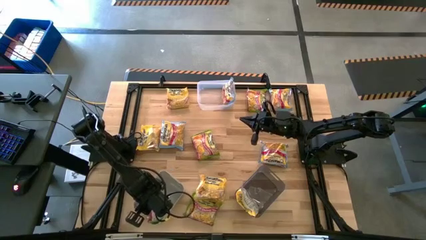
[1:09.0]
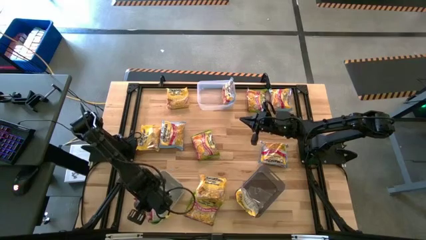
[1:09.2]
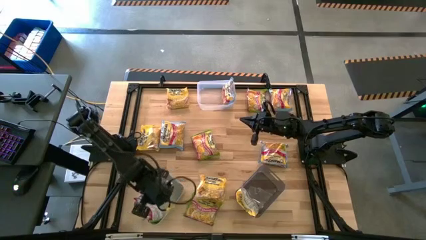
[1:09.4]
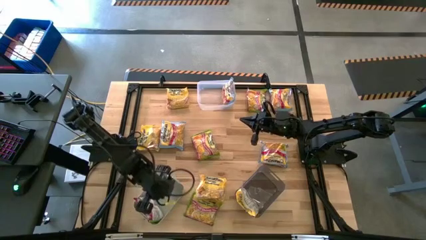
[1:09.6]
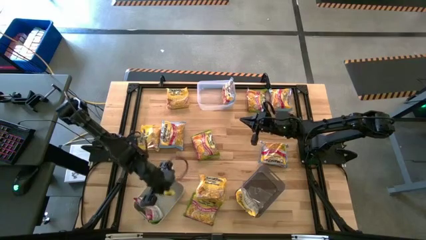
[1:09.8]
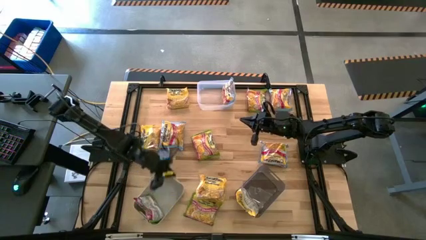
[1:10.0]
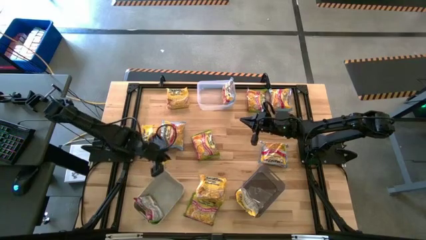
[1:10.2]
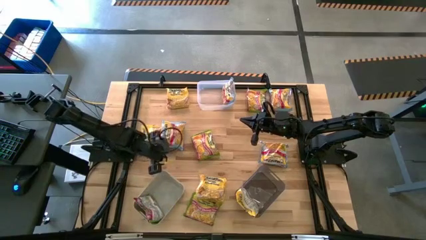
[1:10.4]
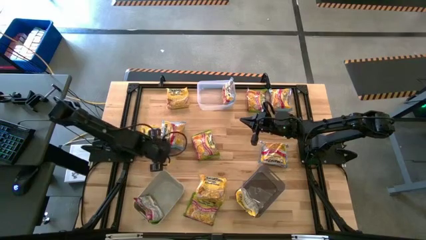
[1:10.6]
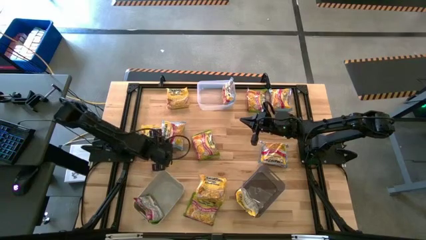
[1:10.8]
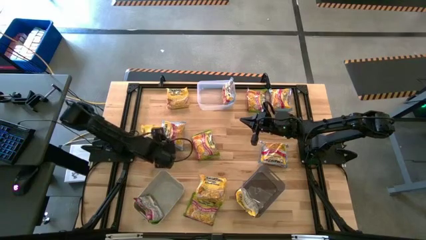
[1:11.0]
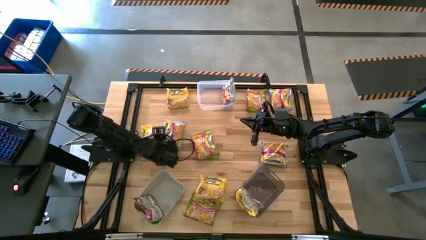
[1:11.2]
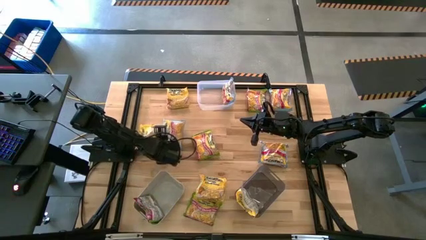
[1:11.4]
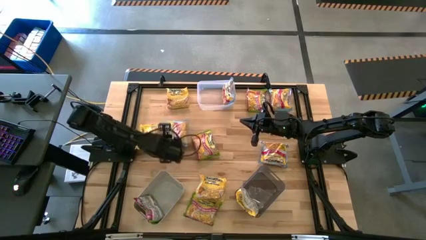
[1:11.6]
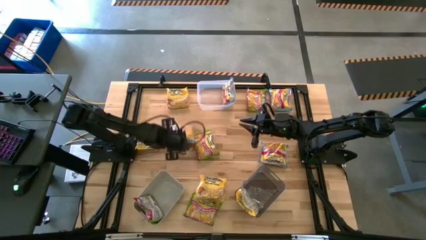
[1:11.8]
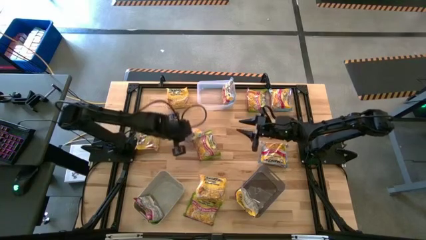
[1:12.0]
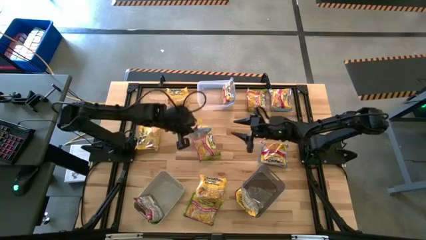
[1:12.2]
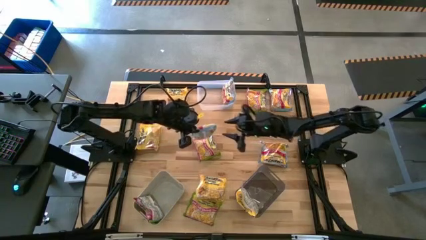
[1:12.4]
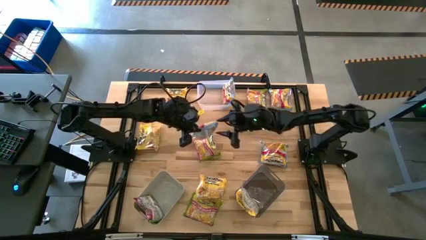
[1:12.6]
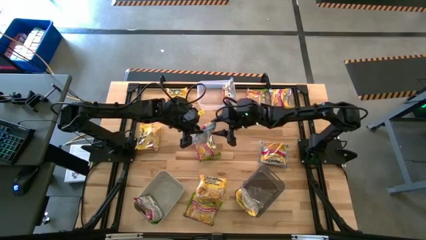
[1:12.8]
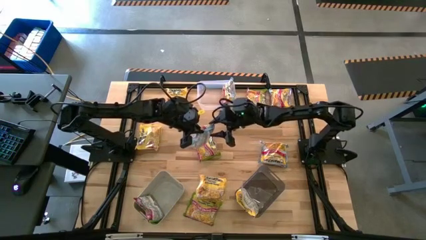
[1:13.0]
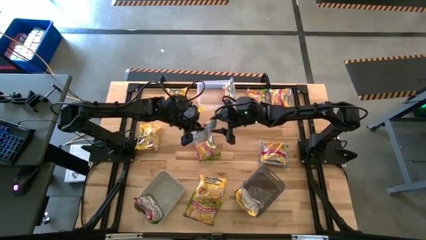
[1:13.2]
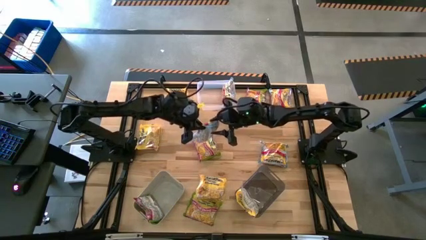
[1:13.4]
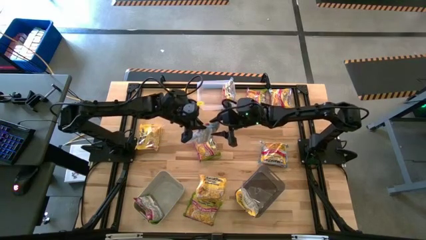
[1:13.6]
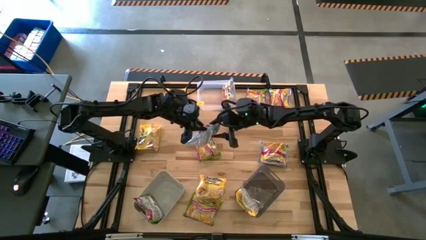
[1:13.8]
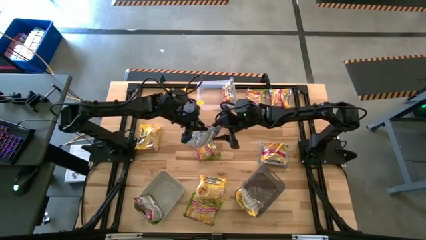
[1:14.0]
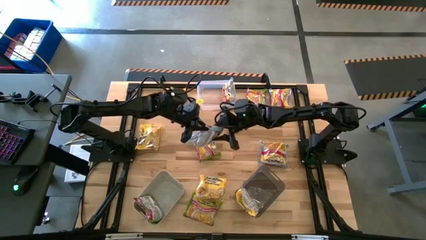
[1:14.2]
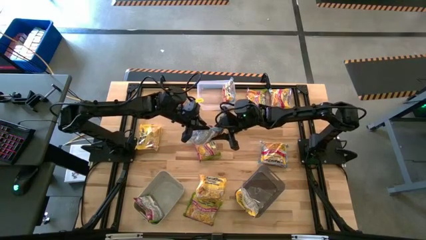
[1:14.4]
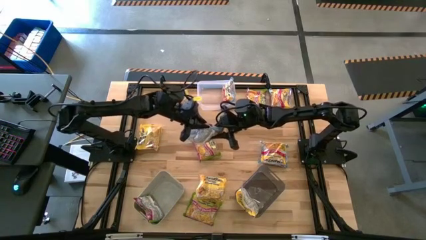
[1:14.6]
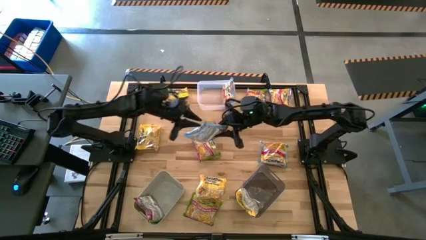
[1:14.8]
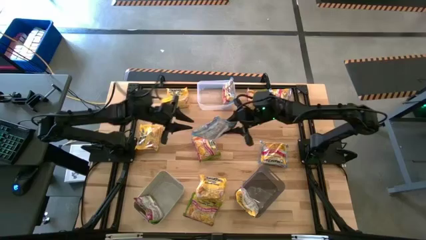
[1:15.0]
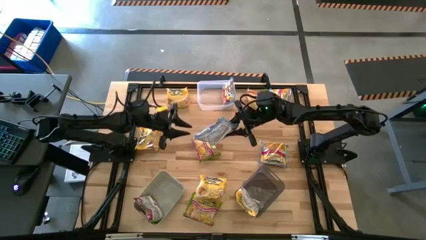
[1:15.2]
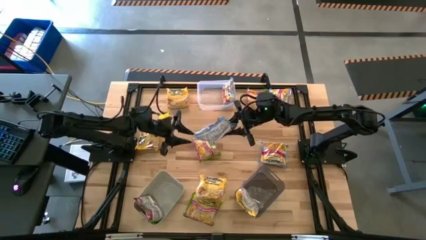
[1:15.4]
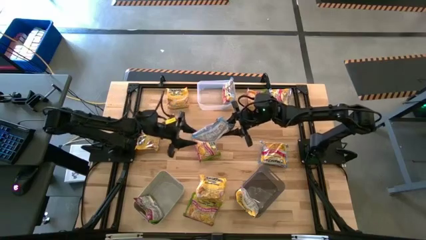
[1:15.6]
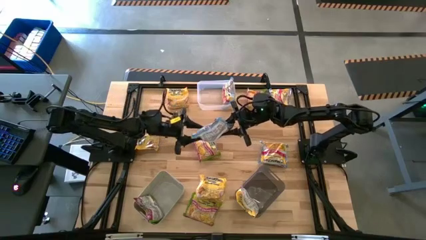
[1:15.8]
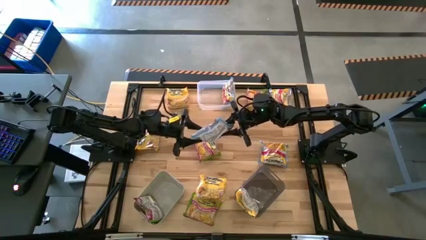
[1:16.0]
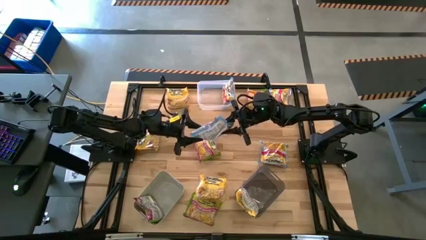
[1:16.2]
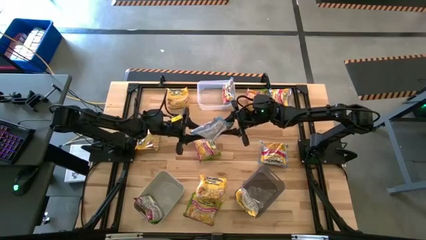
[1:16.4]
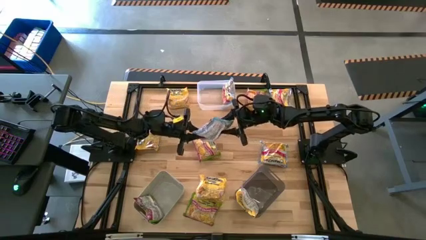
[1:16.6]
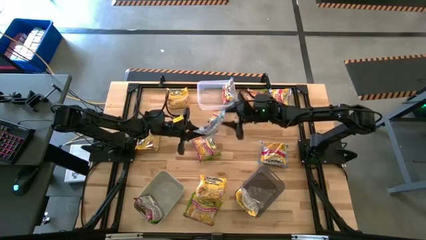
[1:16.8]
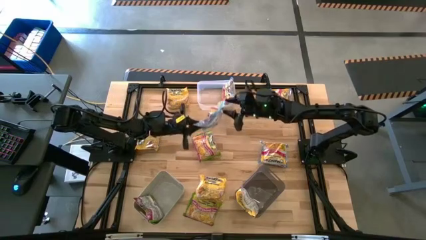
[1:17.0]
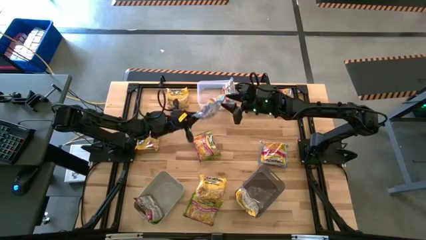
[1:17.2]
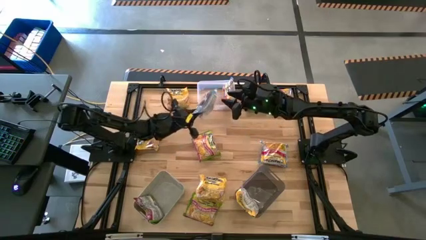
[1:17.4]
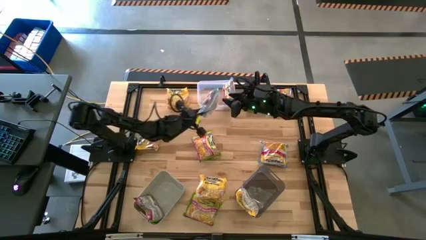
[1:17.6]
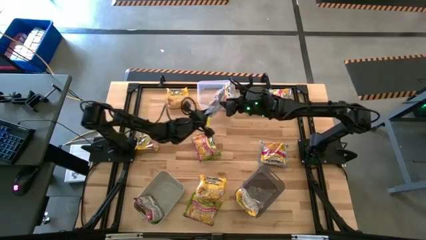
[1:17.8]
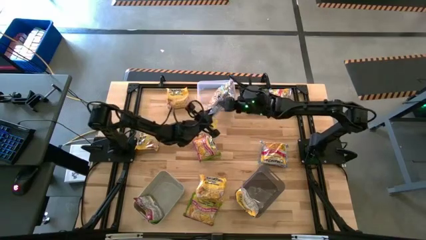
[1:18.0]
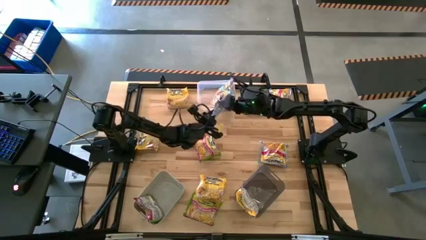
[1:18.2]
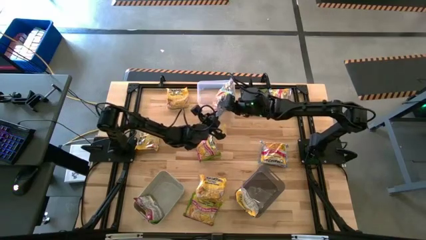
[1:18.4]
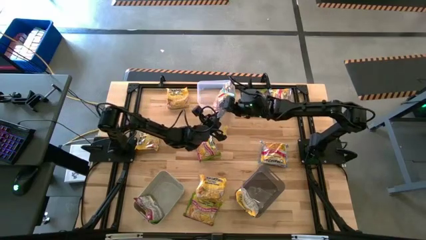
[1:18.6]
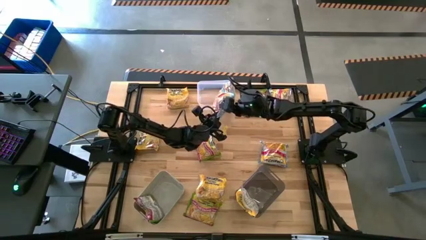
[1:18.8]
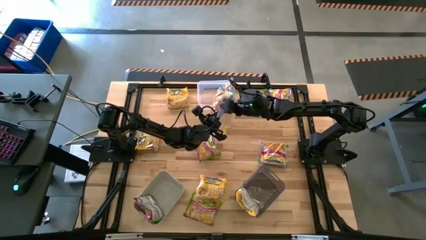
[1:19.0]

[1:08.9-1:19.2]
Task: Sort Maruchan noodles
Put the light blue noodle pack into the transparent bin

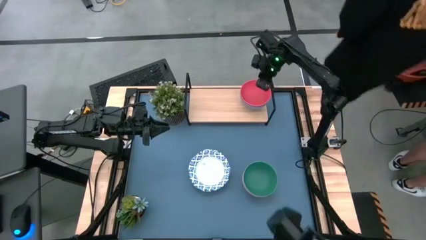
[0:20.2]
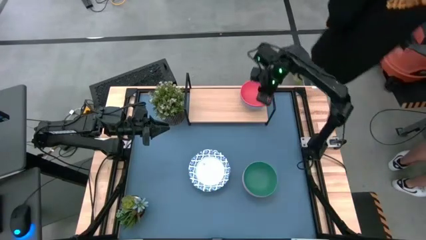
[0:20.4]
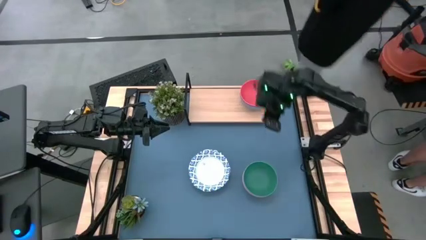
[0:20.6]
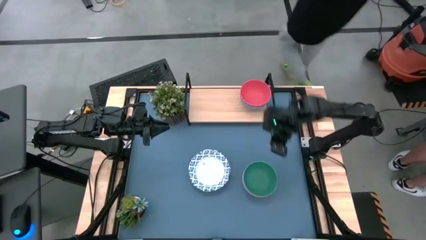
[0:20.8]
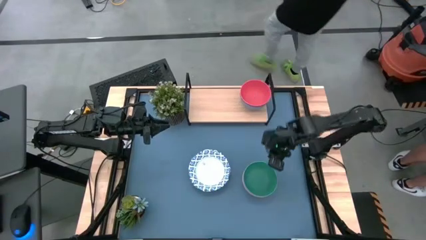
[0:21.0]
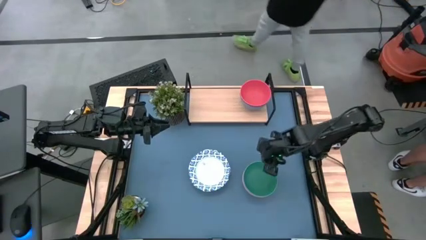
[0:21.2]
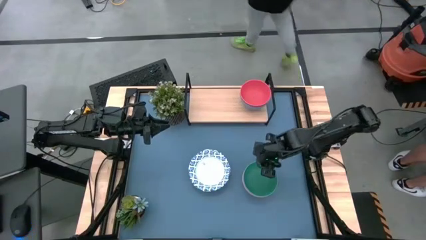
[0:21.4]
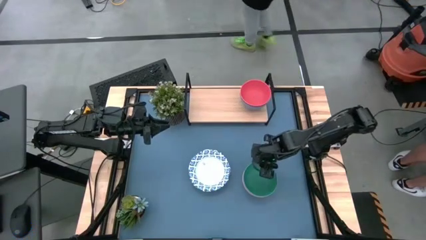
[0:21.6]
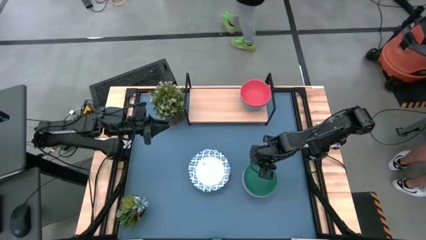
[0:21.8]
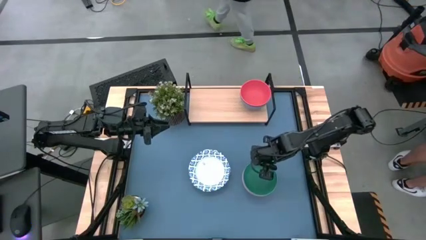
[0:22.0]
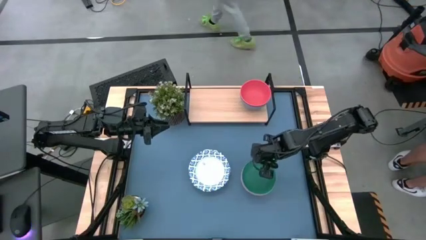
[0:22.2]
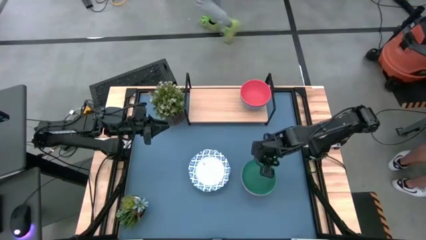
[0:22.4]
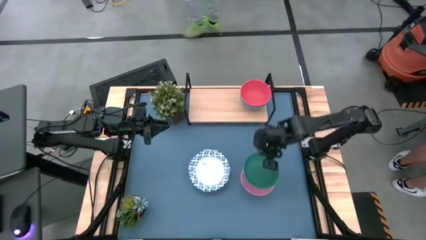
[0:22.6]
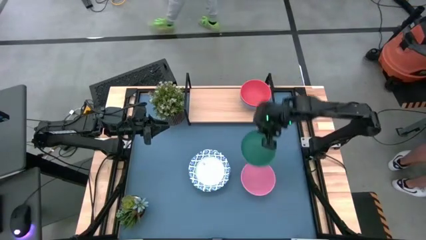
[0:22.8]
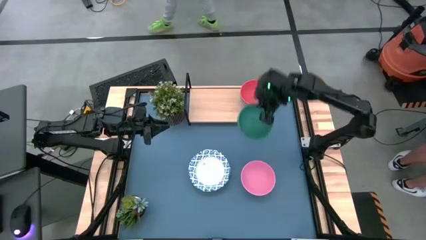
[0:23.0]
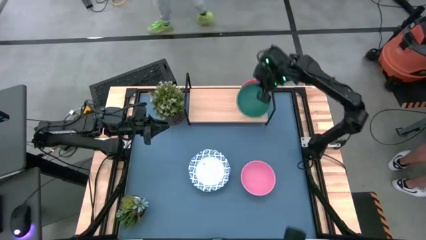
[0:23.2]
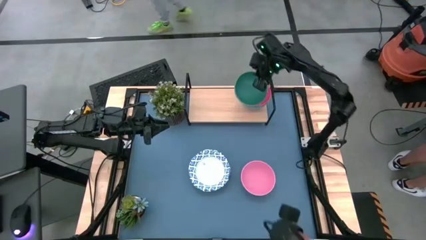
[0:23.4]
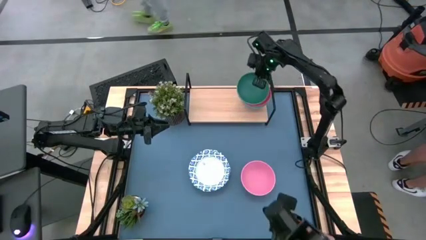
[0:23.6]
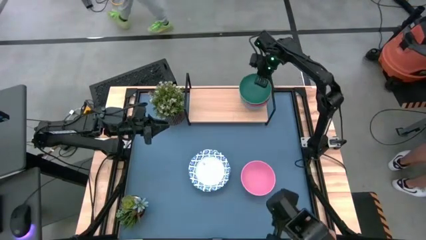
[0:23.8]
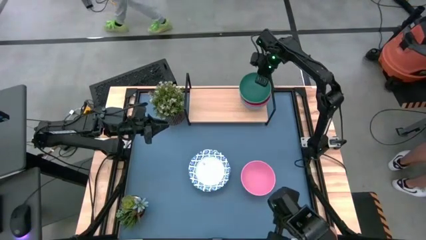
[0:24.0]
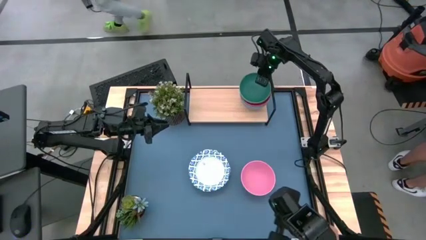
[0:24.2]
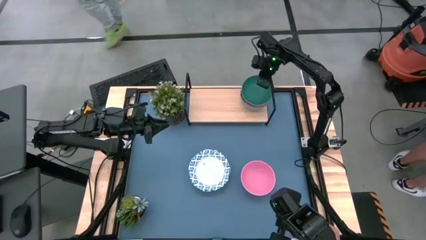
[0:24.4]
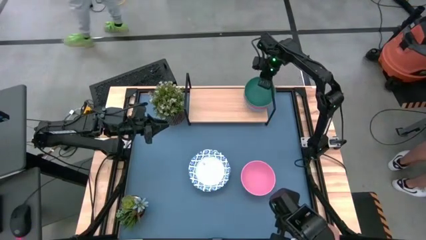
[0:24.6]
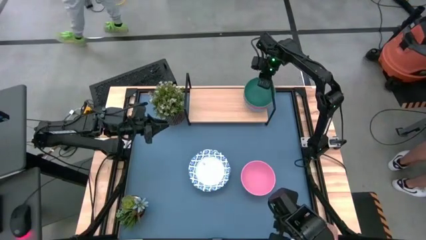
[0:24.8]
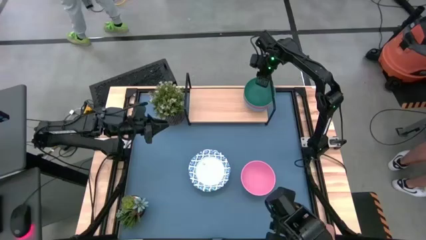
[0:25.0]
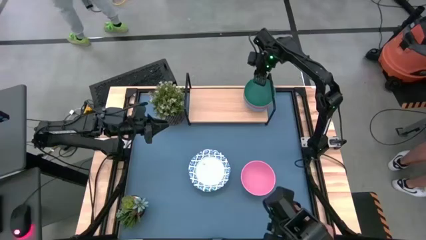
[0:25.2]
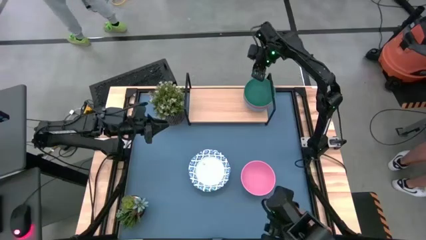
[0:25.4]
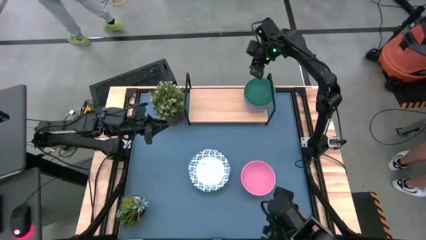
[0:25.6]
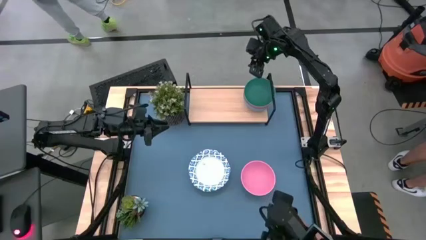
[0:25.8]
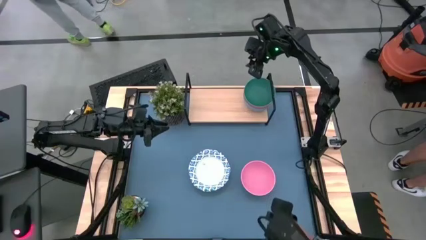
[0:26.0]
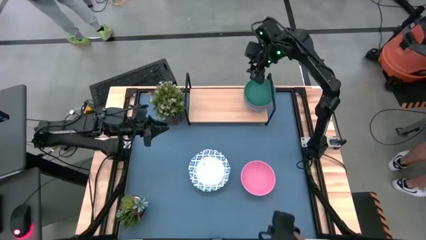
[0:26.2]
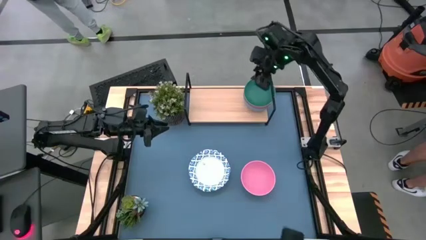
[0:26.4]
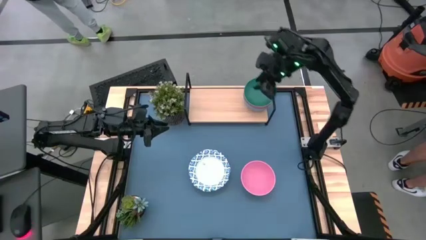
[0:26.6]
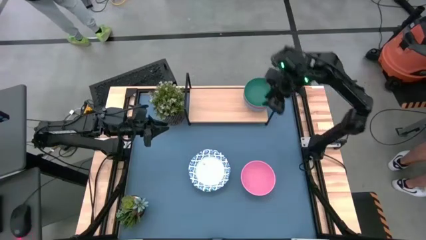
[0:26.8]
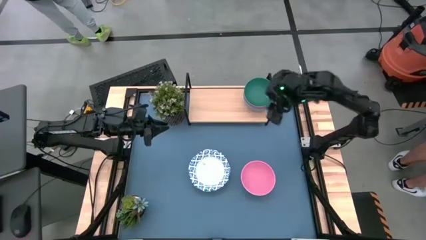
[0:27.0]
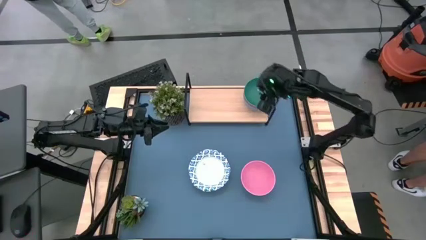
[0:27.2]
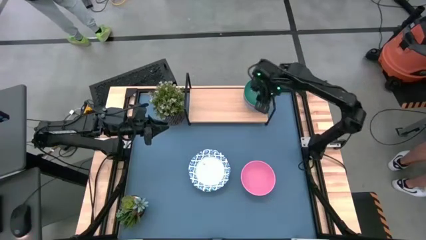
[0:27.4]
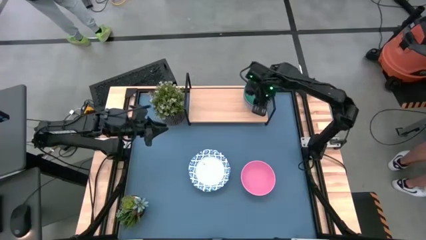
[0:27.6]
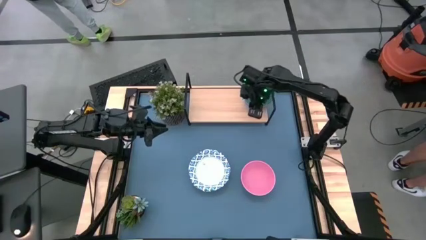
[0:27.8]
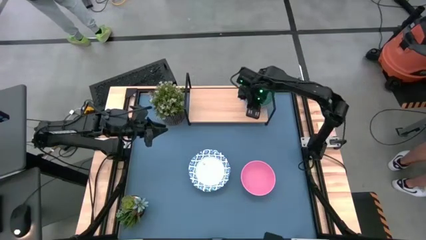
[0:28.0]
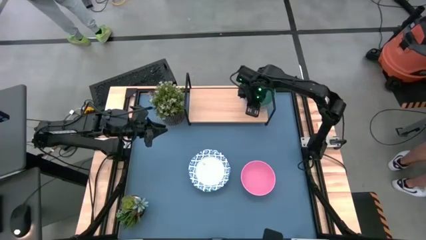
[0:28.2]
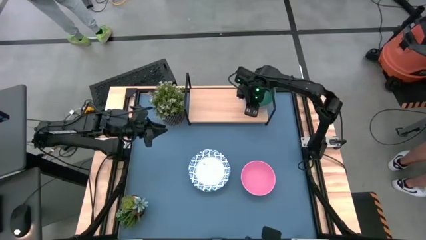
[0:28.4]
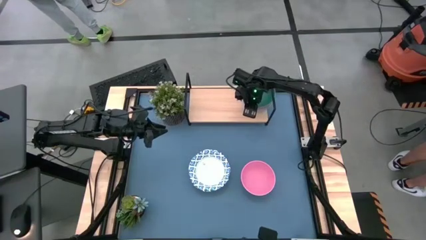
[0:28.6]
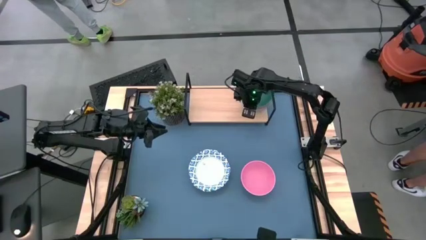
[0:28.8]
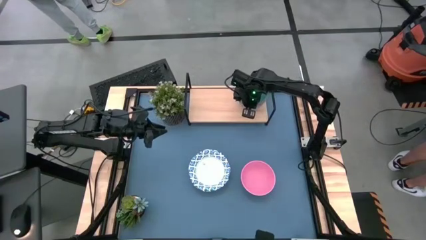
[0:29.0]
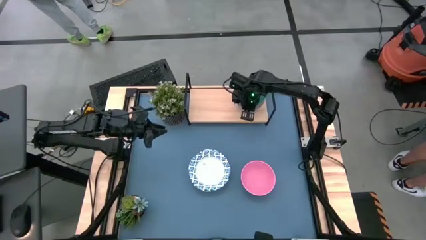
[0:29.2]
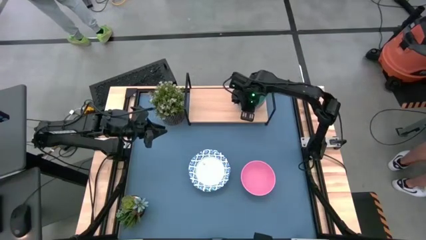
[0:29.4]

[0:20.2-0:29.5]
Task: Place and stack bowls onto a shelf
Stack the green bowl on top of the orange bowl on the shelf
